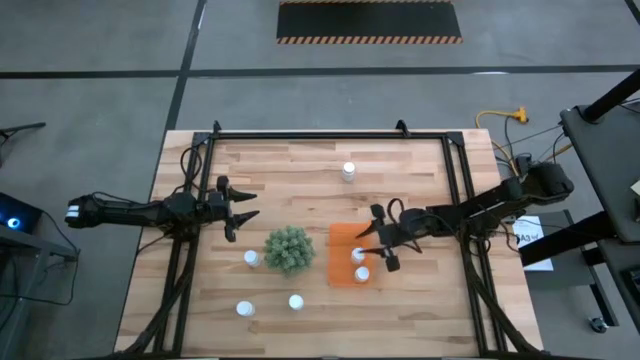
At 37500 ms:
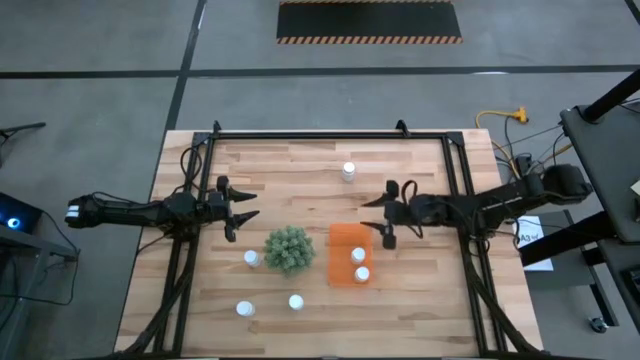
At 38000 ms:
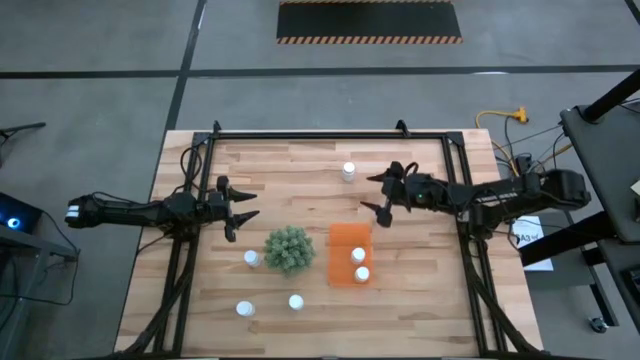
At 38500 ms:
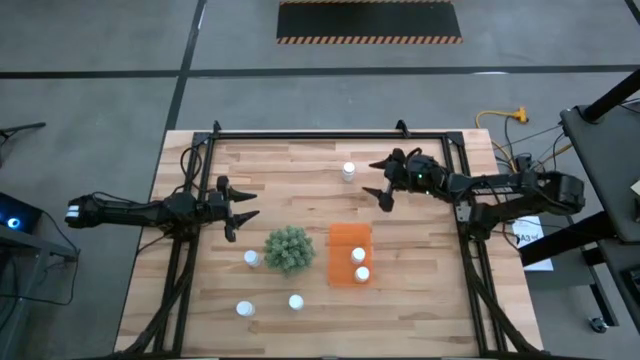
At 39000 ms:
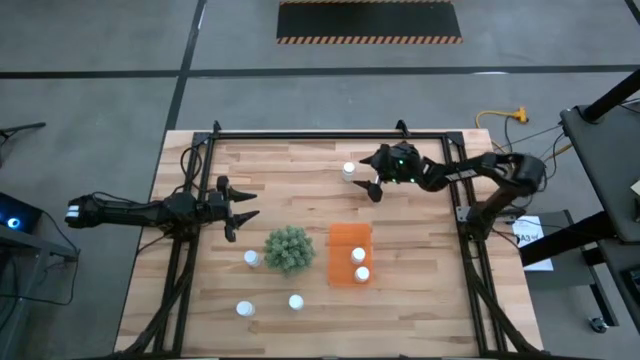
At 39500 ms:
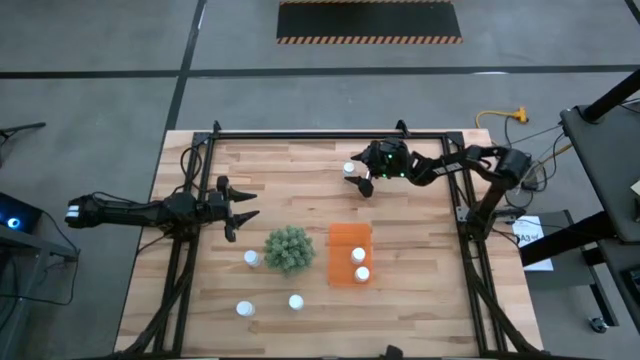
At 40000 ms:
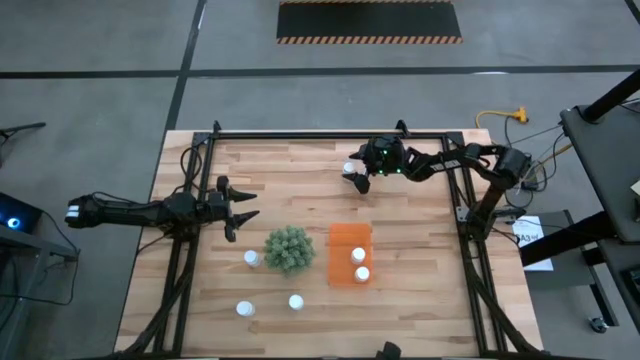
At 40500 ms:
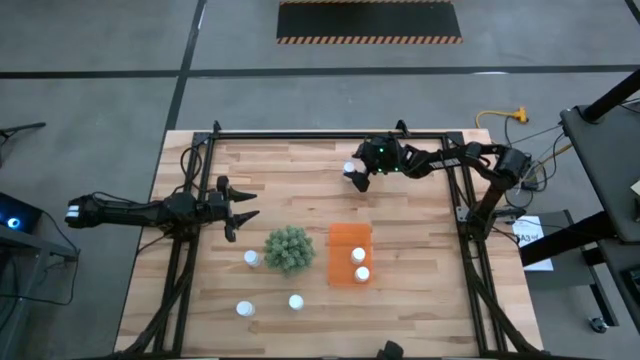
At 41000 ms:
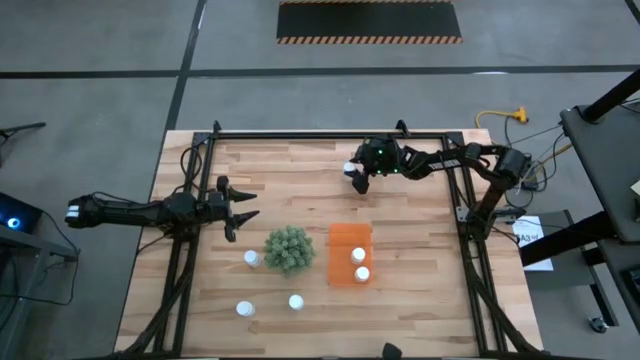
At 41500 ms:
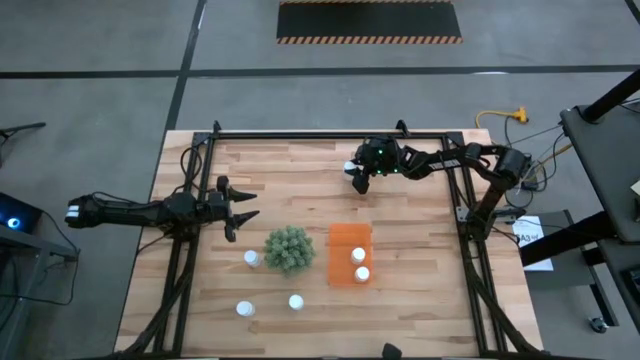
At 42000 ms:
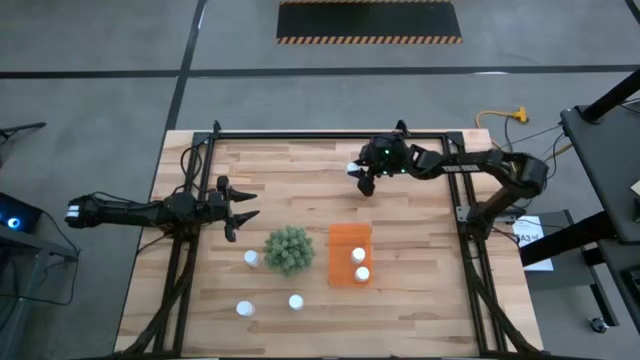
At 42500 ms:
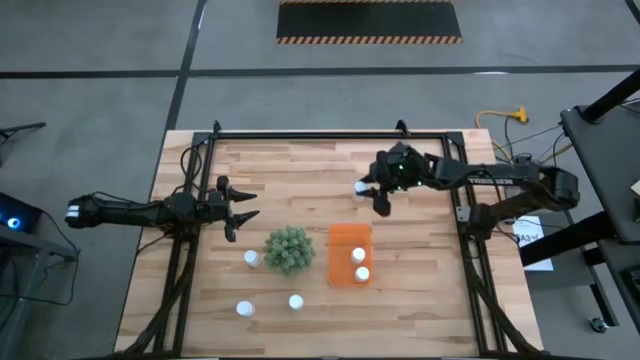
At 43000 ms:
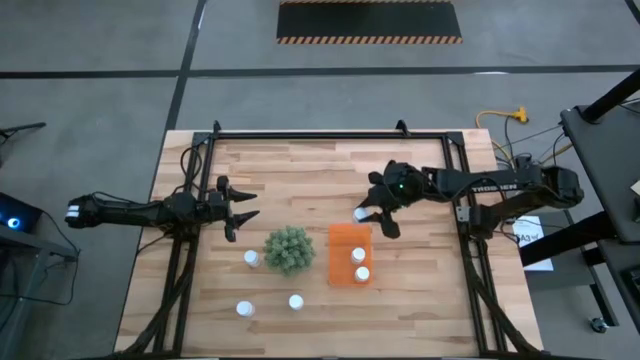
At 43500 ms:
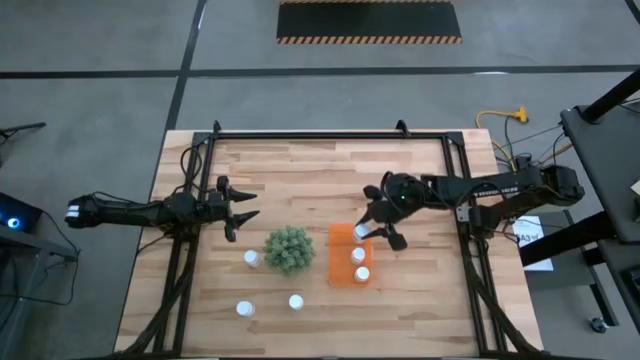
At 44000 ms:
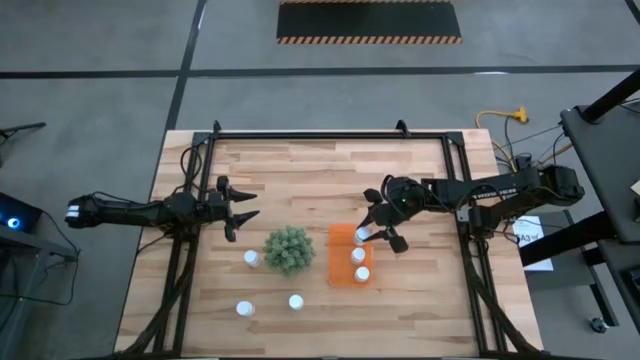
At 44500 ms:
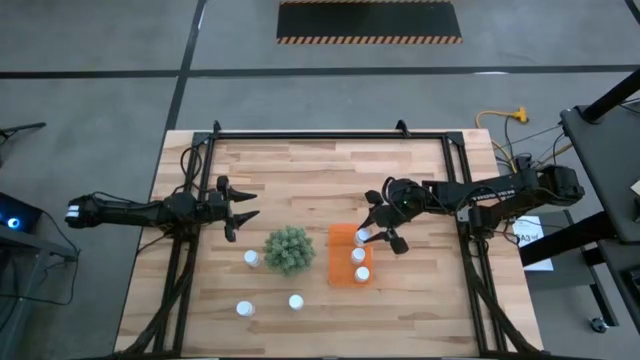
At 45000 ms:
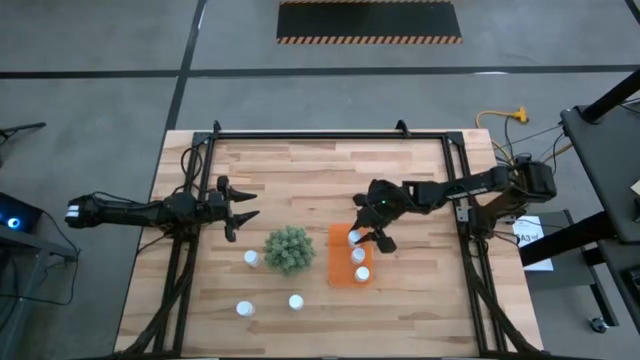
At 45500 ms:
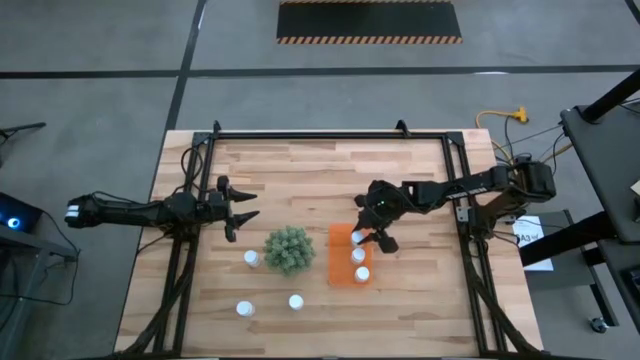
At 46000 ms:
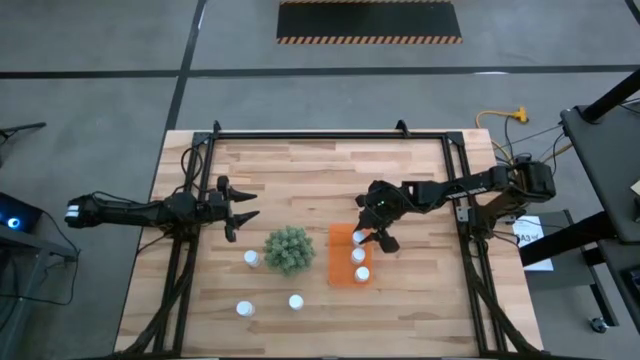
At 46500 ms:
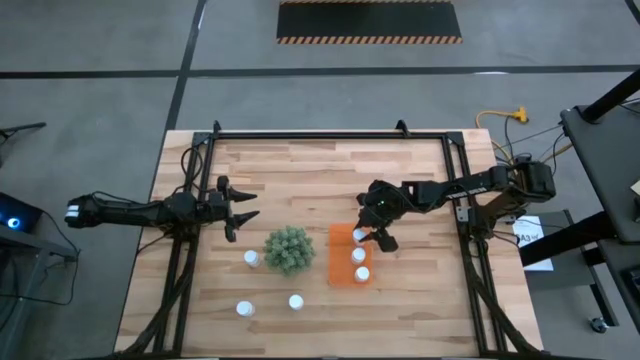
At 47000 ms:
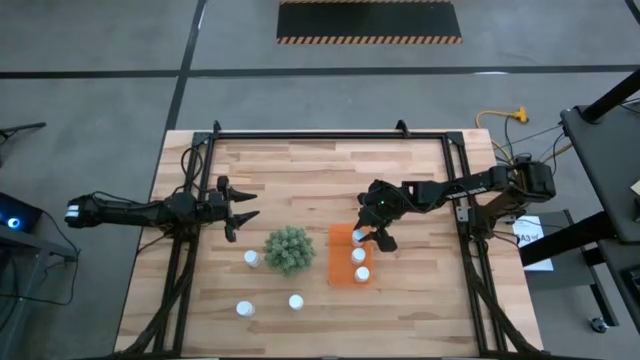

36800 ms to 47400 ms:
Task: Pick and place pill bottles into a basket
Put the white medicine bottle into the orange bin

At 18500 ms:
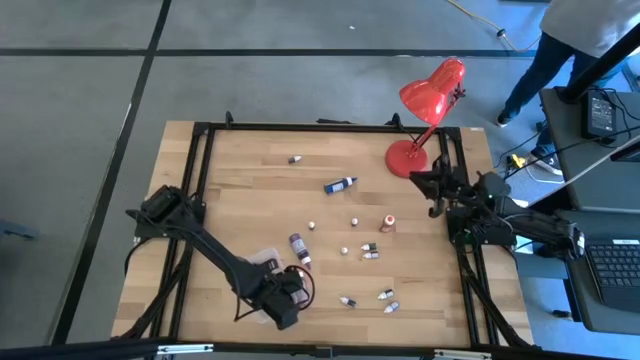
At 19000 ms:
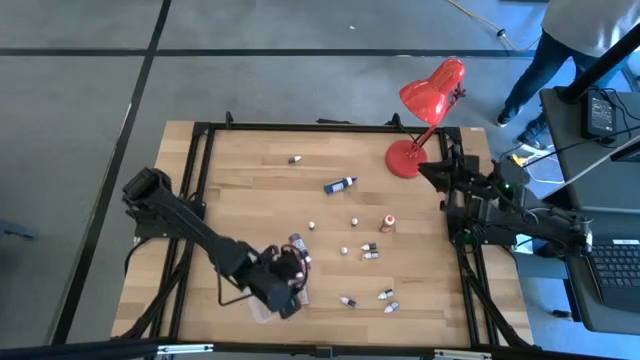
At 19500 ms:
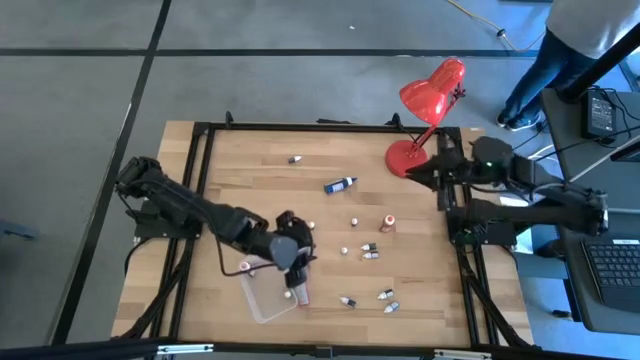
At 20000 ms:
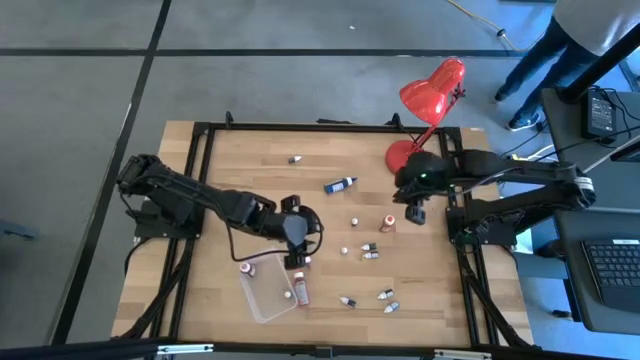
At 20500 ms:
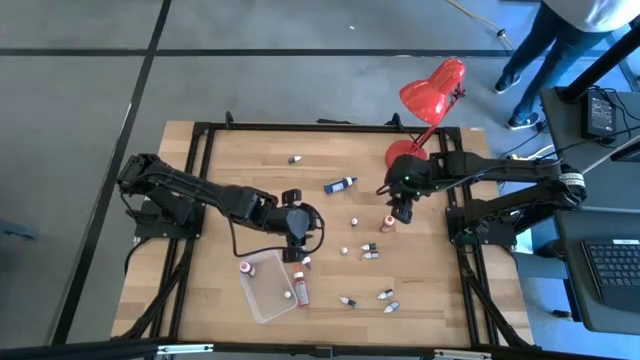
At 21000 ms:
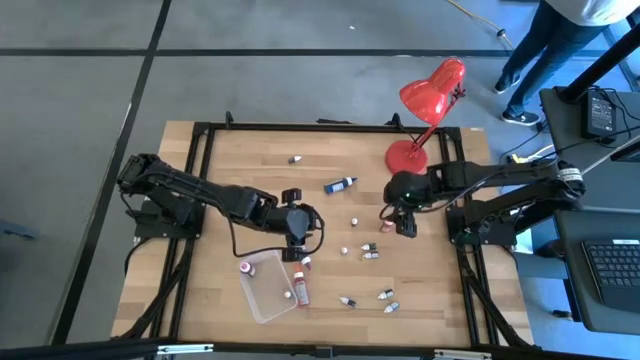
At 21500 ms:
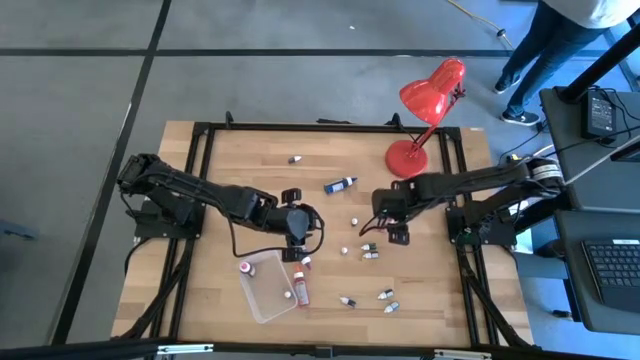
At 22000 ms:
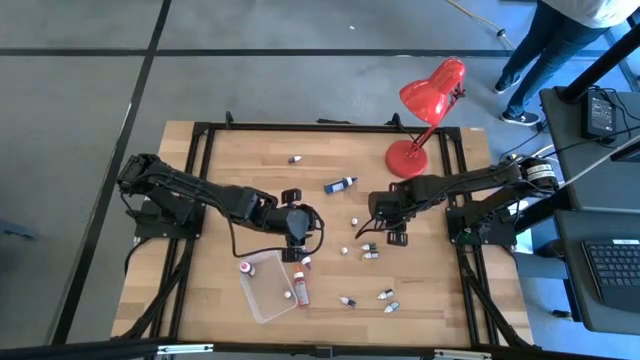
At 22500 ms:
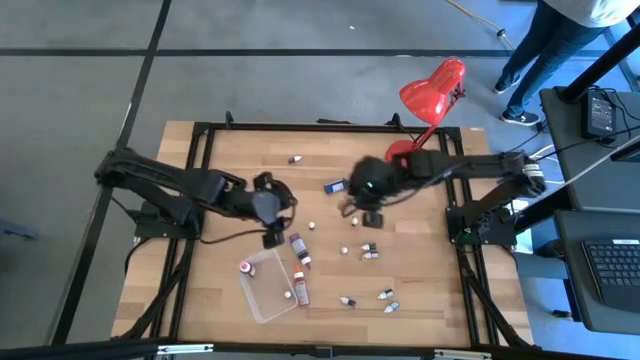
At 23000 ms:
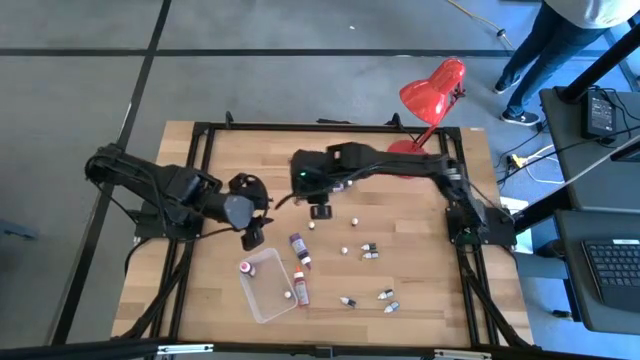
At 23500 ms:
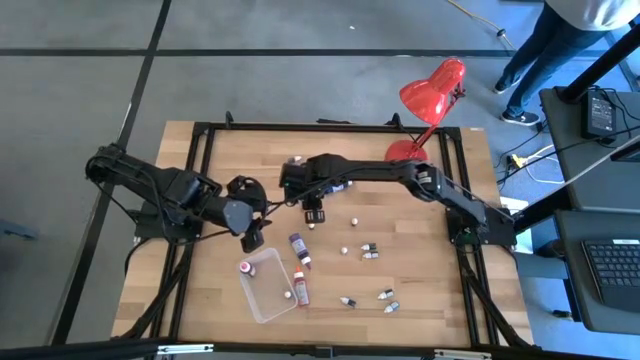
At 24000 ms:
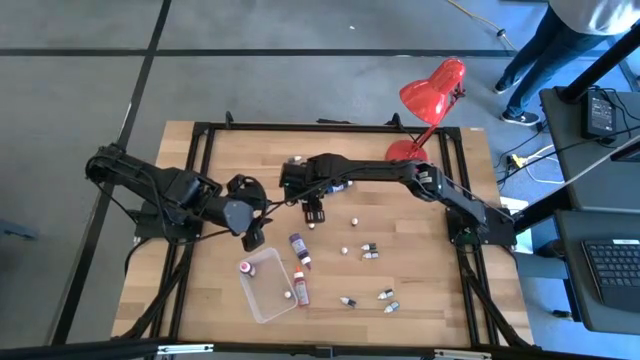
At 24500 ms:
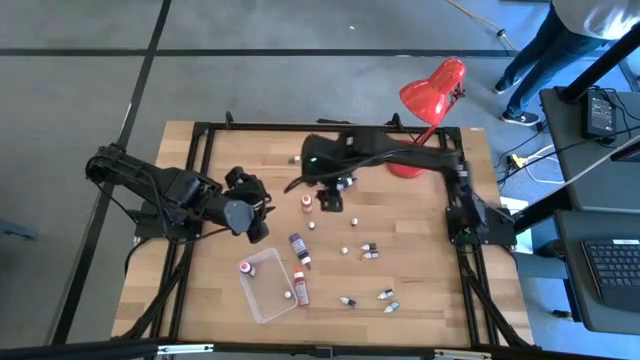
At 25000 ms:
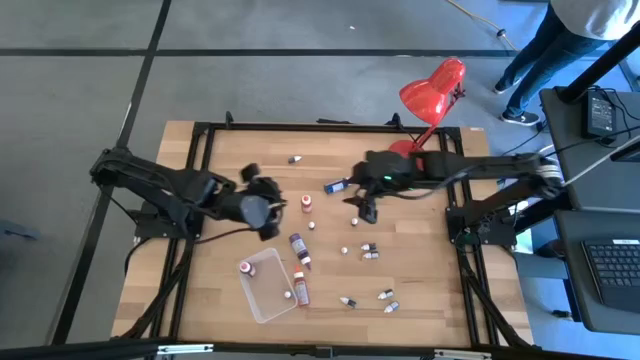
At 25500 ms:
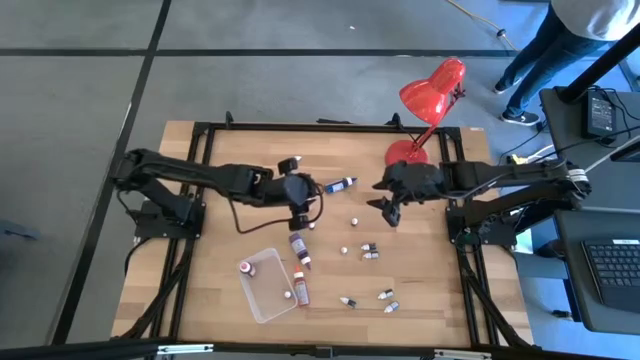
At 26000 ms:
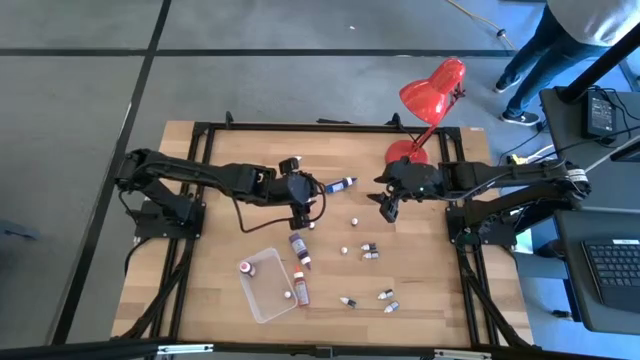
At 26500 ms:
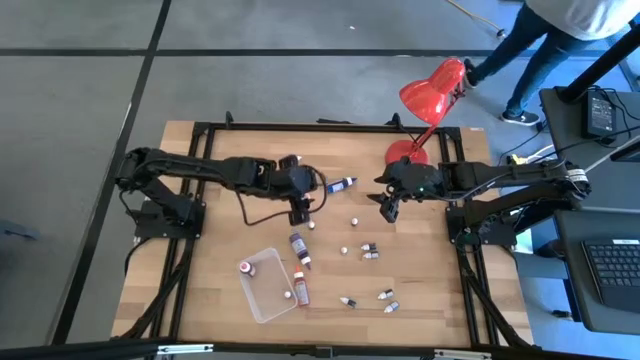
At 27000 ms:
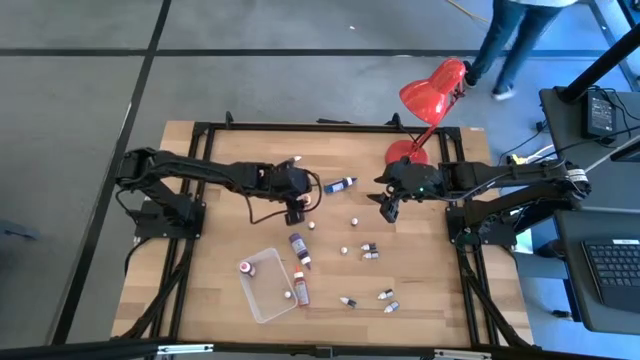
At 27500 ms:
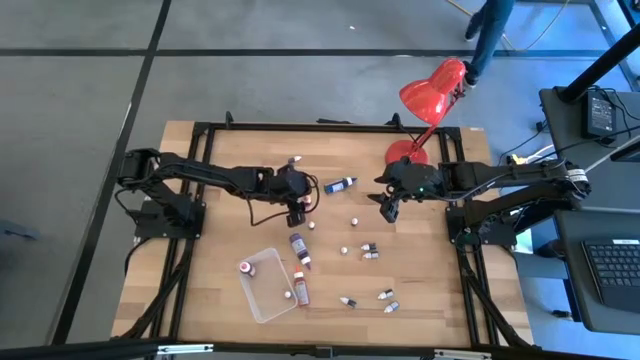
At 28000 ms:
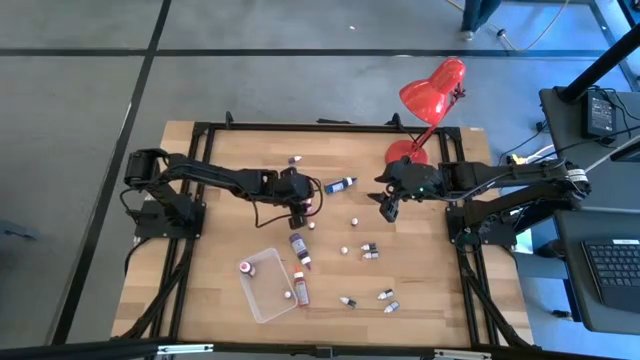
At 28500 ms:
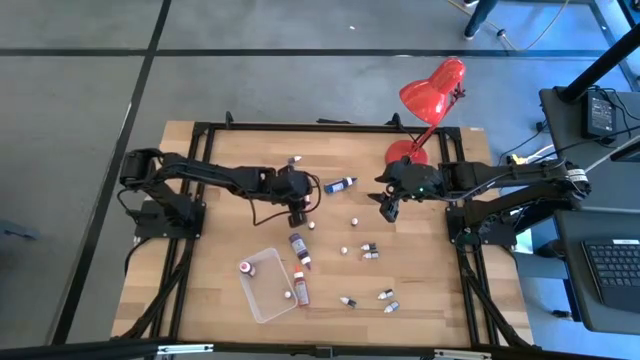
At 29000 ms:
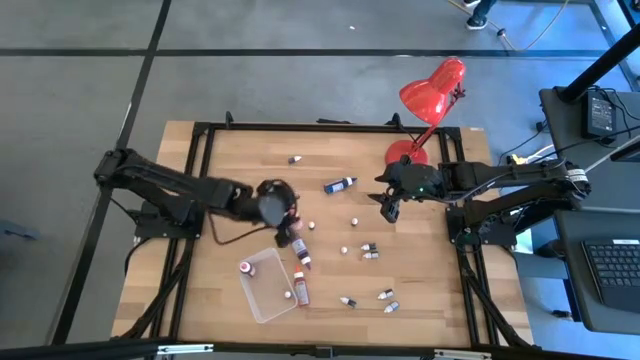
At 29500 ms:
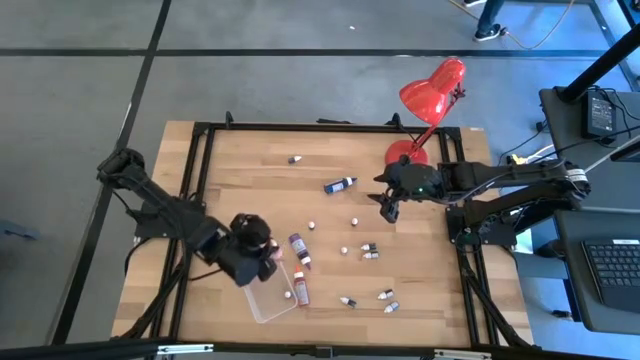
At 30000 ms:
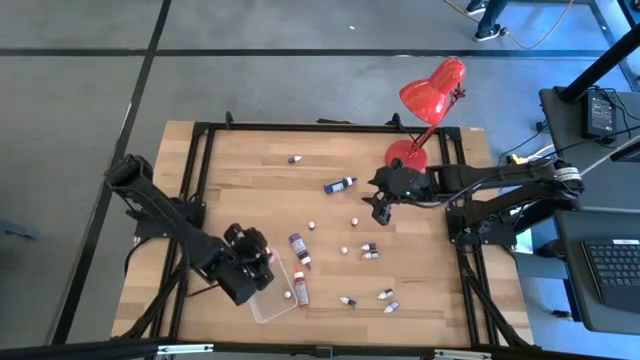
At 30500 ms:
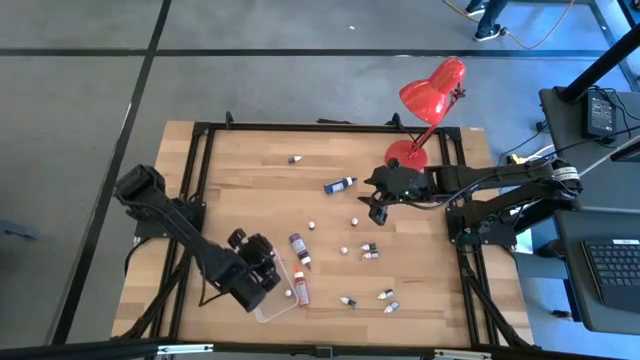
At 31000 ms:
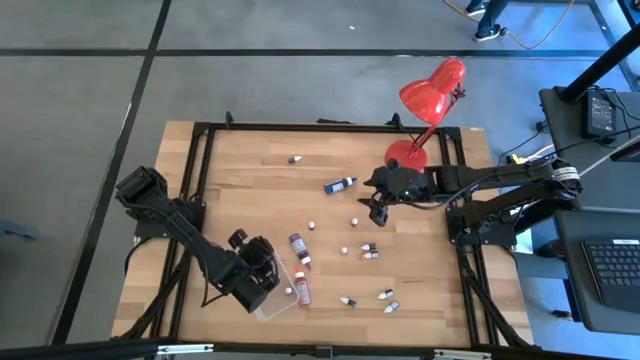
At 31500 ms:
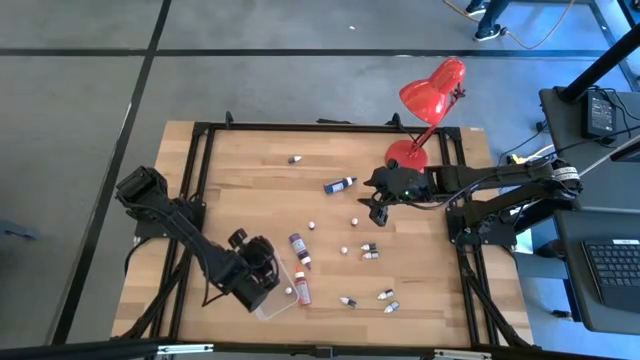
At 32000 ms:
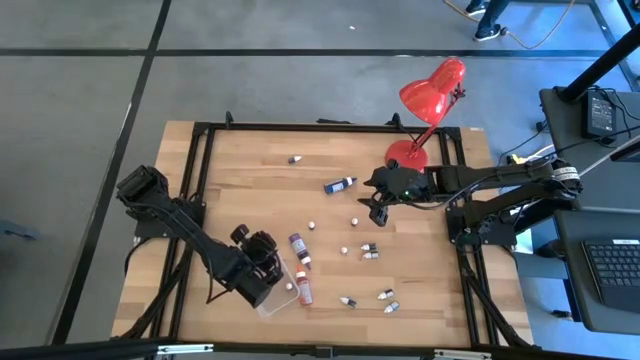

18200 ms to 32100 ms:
Task: Pick & Place food coloring
Put the orange food coloring bottle into the transparent bin
